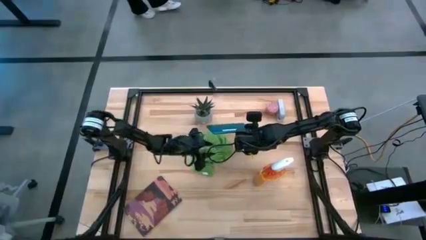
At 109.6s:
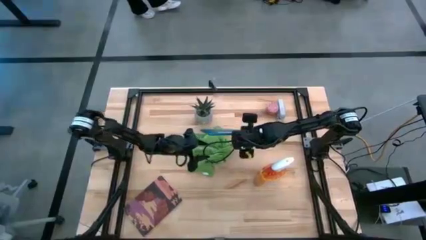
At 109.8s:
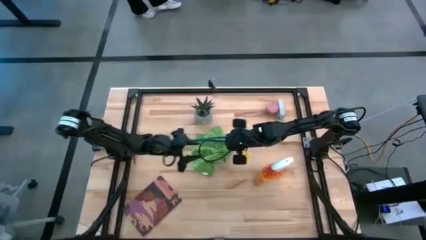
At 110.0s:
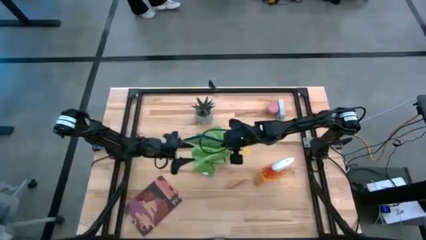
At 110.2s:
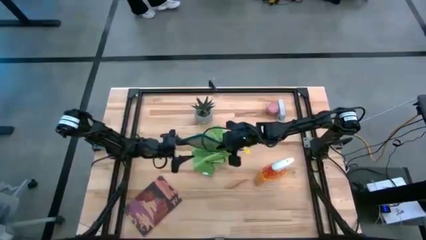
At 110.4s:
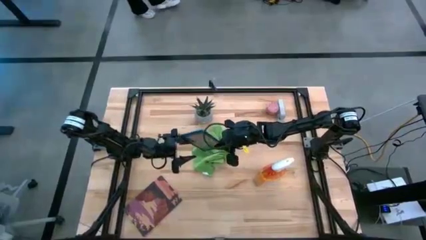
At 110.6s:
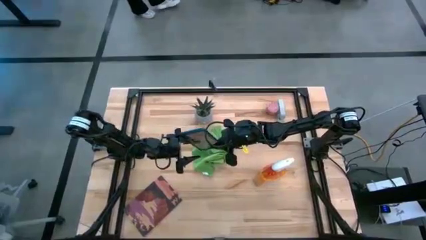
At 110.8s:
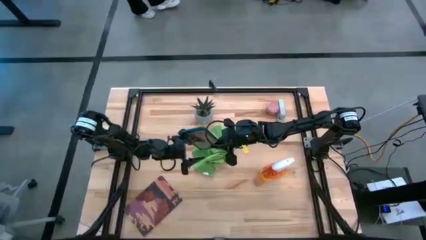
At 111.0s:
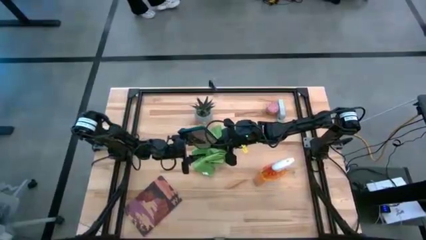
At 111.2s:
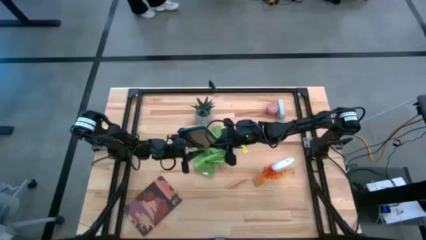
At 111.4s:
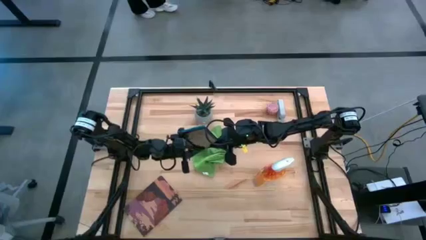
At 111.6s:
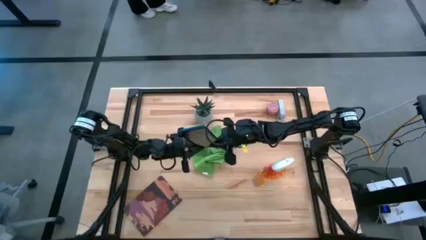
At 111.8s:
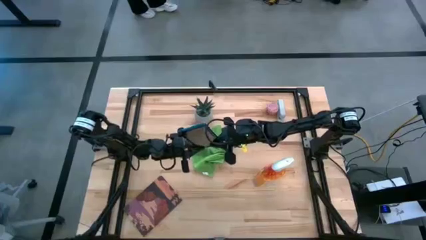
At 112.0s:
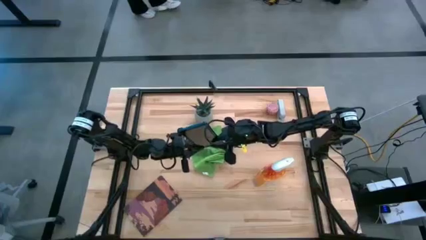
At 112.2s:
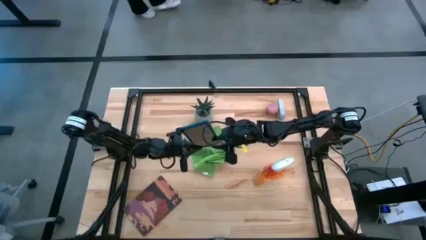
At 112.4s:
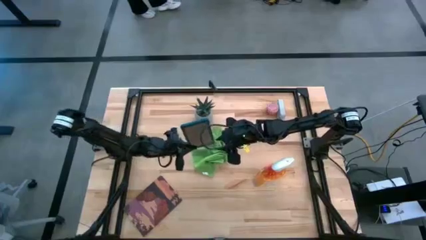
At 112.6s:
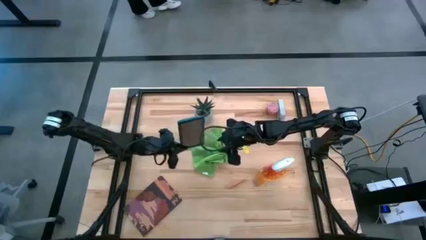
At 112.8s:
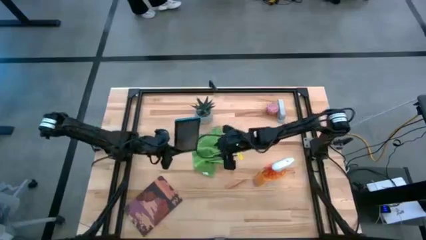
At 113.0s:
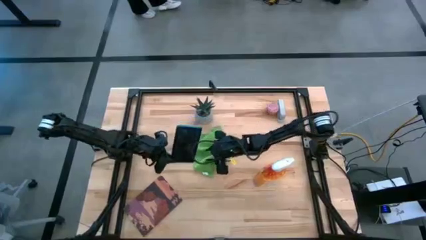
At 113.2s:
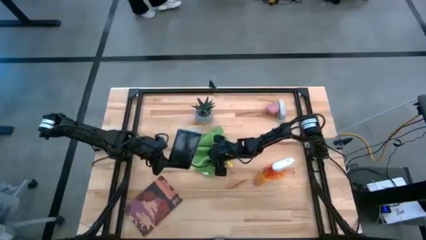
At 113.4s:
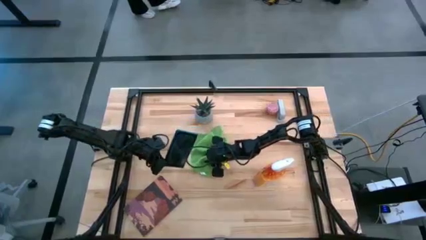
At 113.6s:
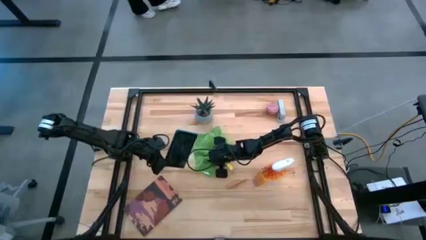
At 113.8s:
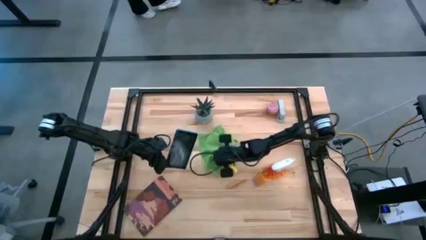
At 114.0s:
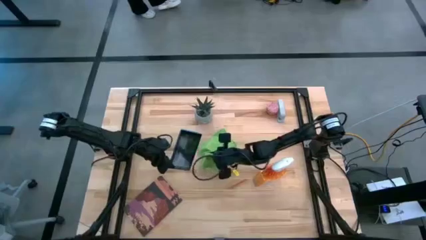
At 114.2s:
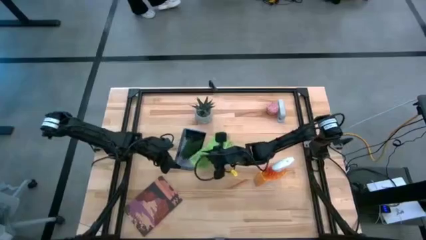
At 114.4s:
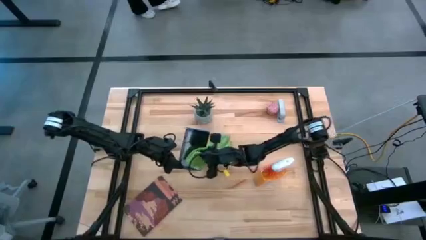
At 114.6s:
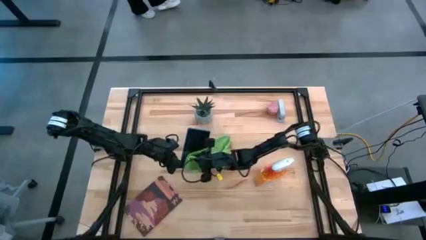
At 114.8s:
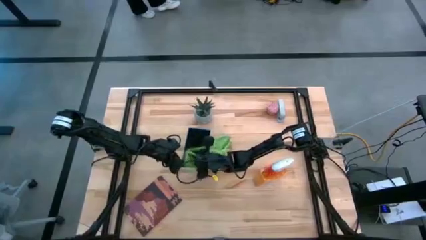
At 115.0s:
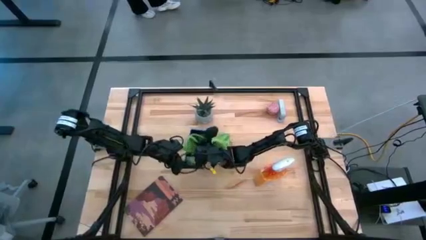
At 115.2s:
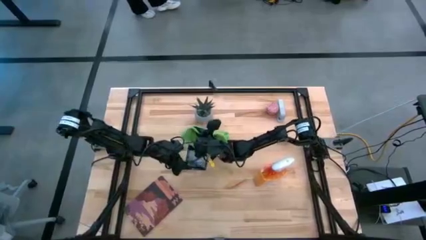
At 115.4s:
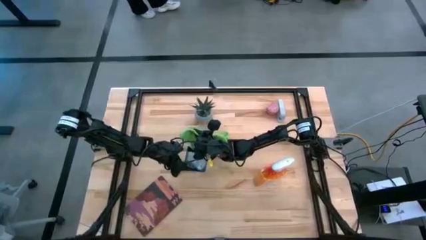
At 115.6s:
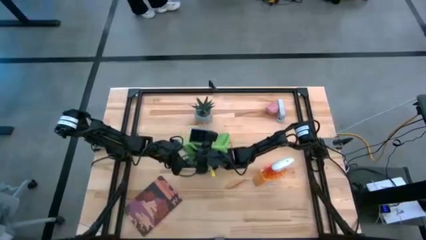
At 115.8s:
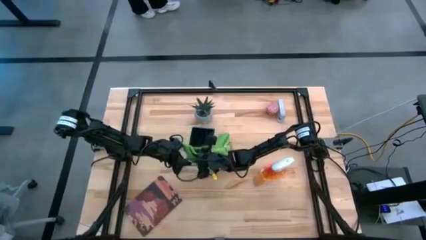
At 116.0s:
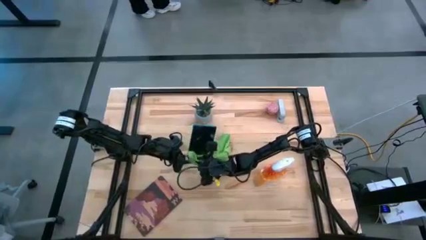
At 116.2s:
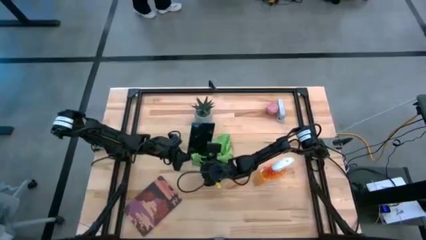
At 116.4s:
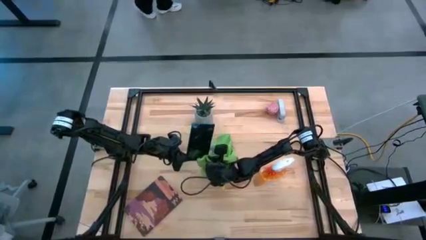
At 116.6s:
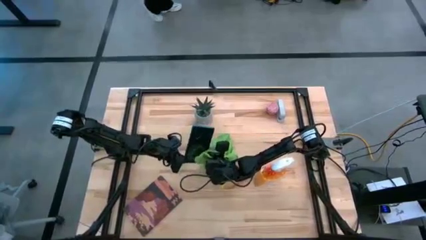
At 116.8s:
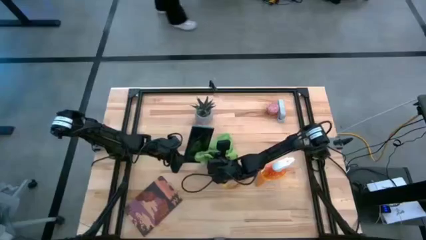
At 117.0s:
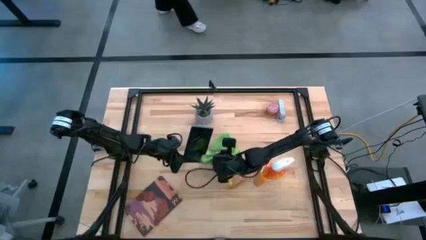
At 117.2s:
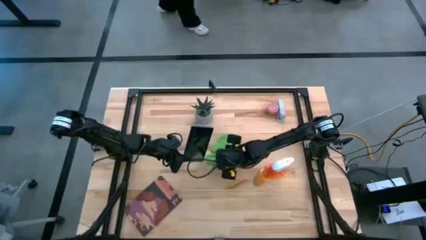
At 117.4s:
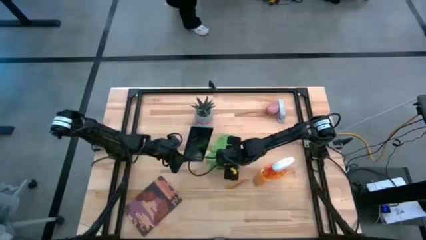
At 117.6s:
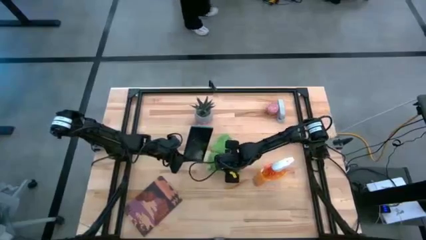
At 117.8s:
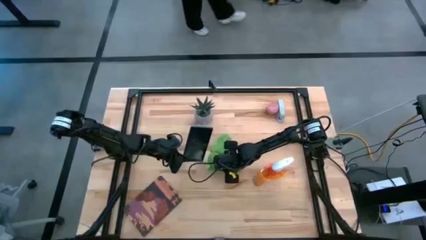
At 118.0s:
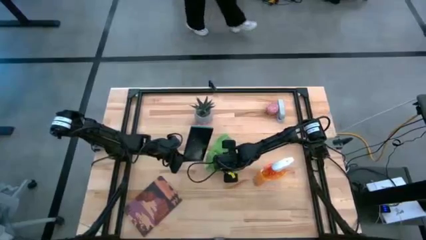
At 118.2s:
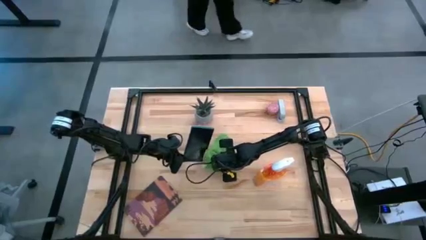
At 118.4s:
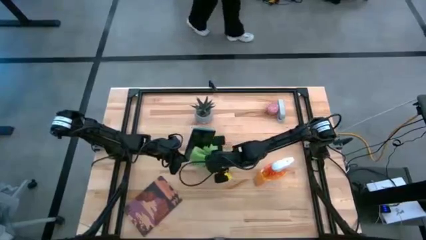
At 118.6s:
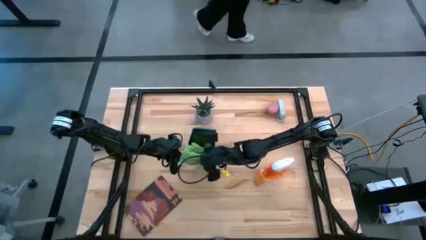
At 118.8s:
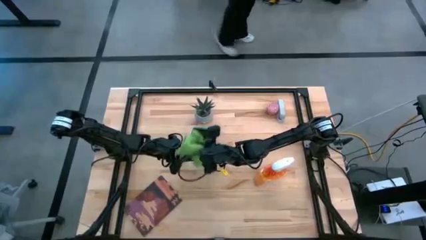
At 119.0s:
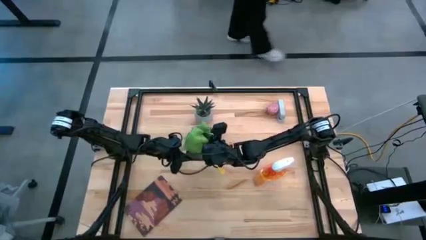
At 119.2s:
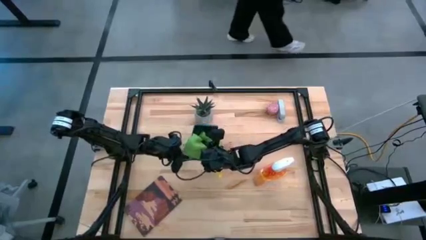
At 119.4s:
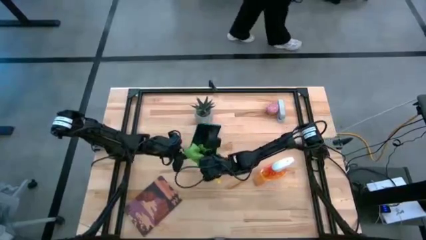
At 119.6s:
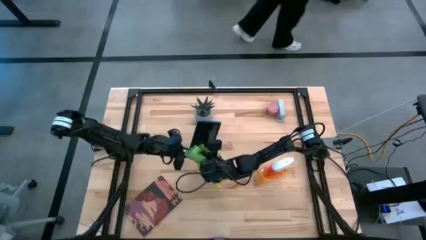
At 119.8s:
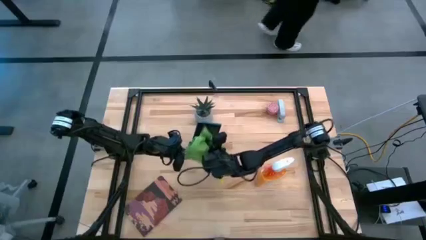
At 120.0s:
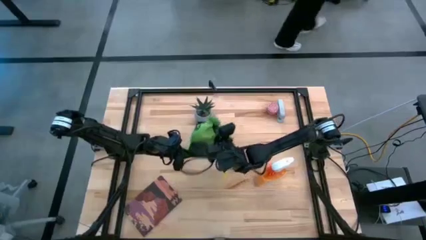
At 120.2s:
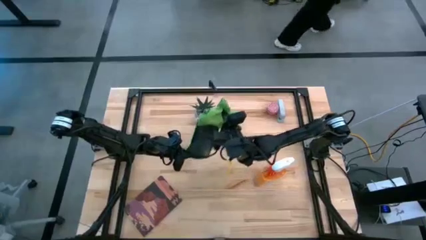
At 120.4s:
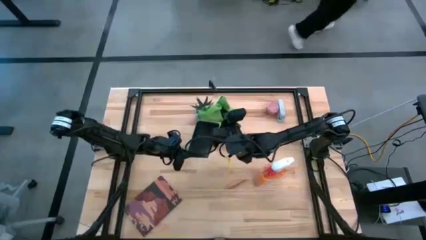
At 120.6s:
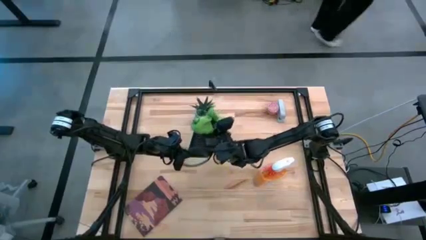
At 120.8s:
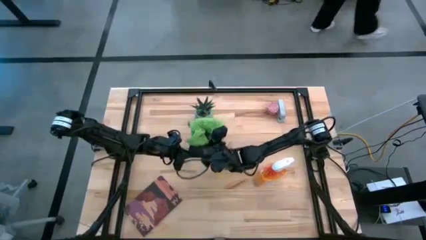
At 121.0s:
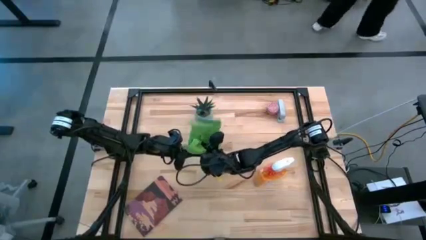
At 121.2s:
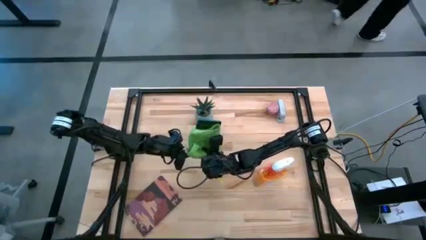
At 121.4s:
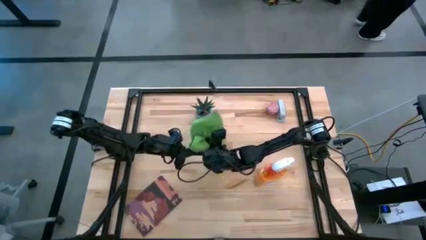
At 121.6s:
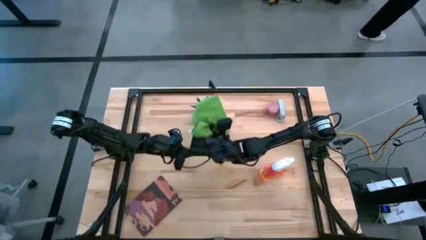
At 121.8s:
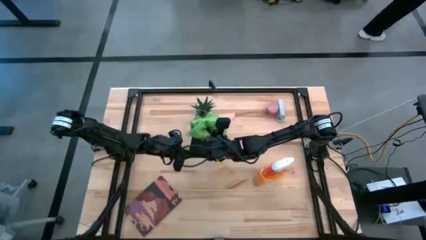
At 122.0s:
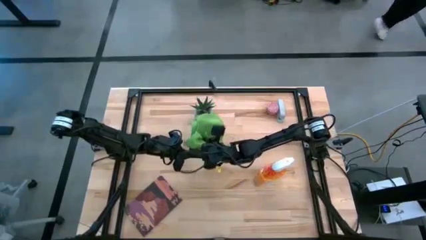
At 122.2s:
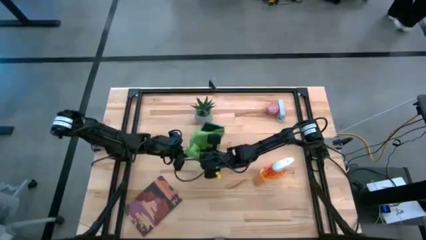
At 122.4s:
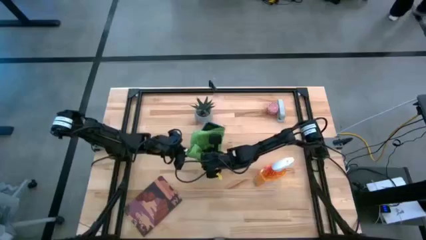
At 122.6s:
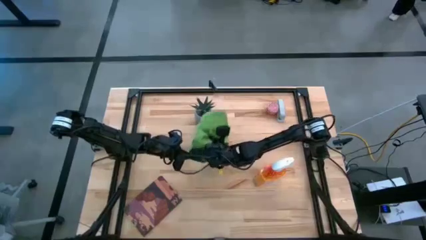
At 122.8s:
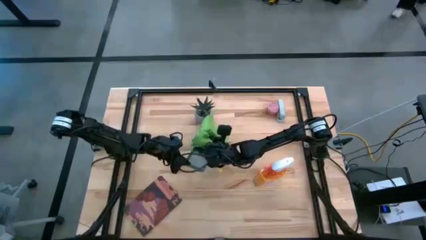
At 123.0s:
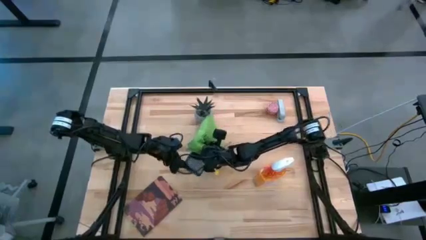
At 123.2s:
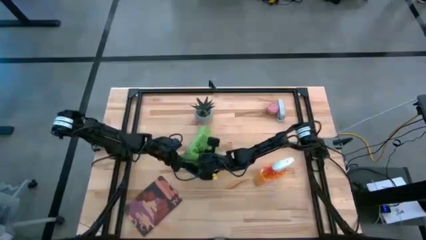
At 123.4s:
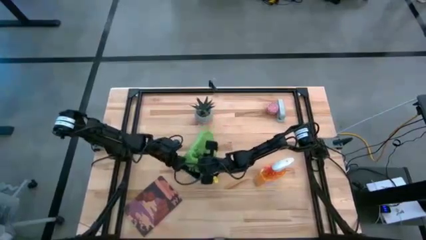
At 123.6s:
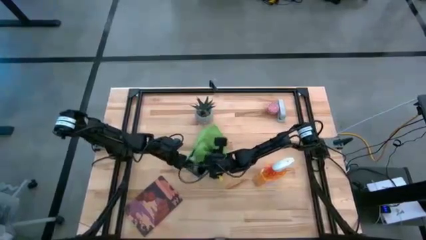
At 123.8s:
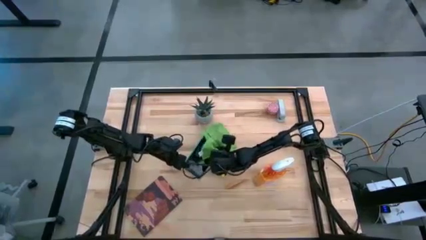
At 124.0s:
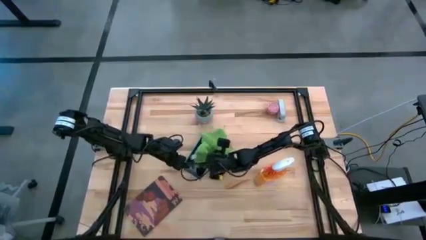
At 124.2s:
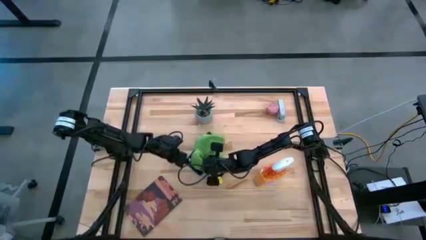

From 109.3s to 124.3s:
Task: Apply microfiber cloth
Wipe the front of the tablet with the microfiber cloth

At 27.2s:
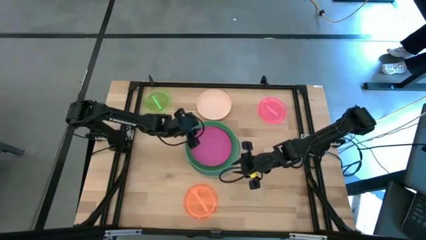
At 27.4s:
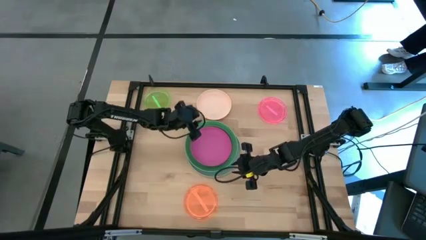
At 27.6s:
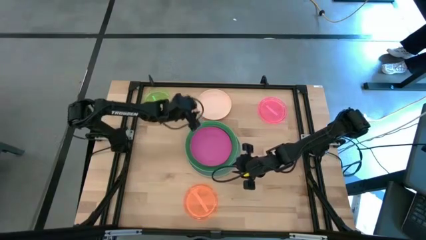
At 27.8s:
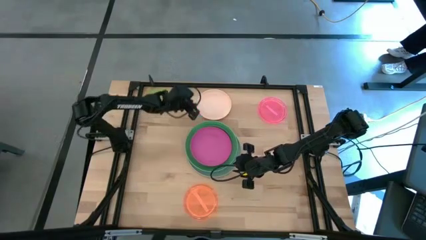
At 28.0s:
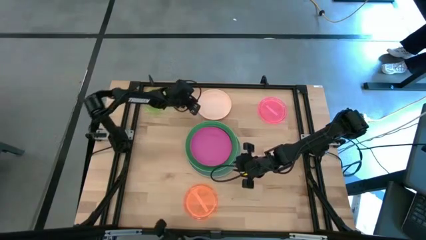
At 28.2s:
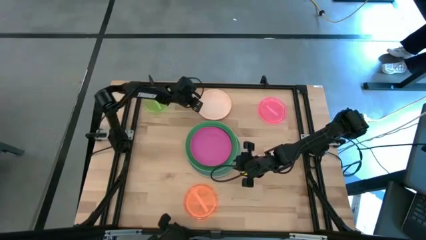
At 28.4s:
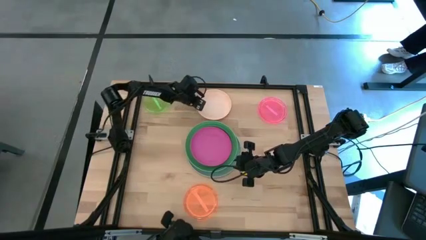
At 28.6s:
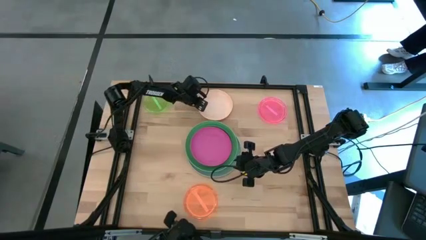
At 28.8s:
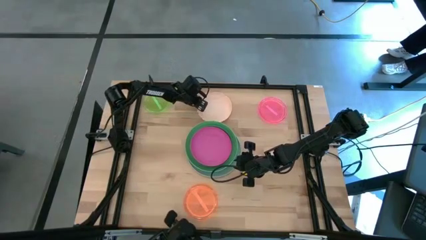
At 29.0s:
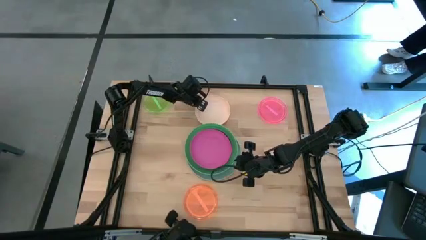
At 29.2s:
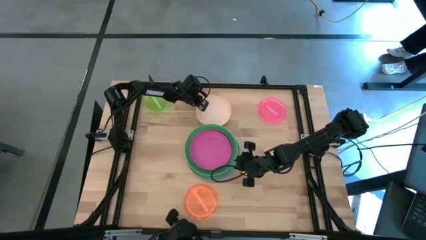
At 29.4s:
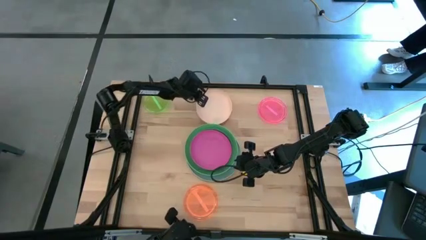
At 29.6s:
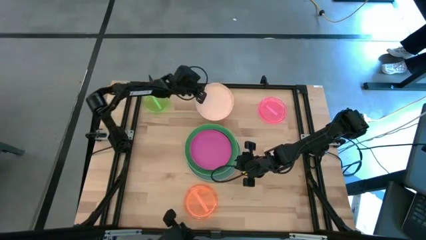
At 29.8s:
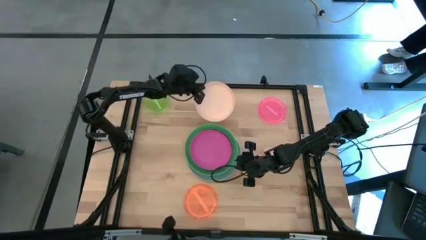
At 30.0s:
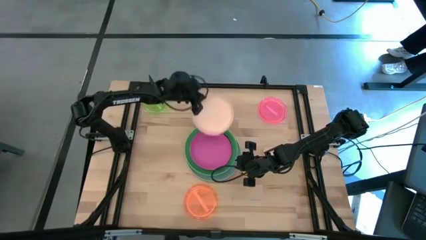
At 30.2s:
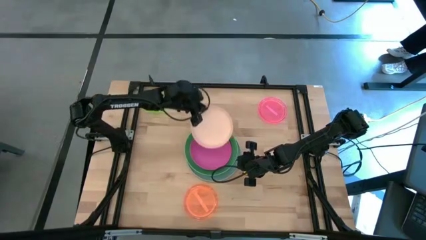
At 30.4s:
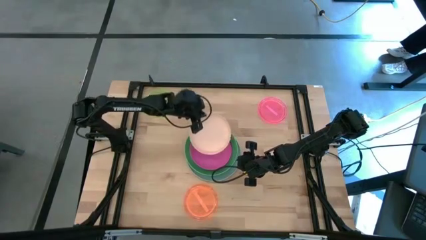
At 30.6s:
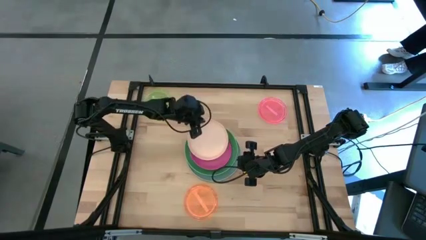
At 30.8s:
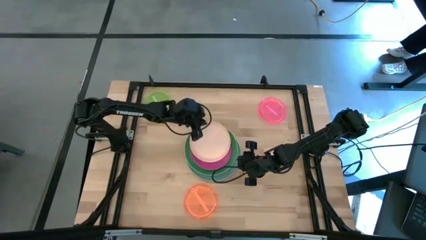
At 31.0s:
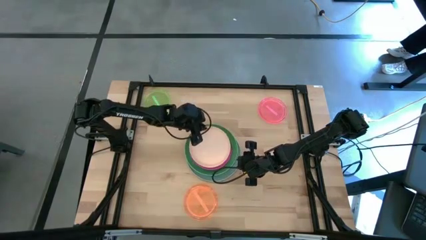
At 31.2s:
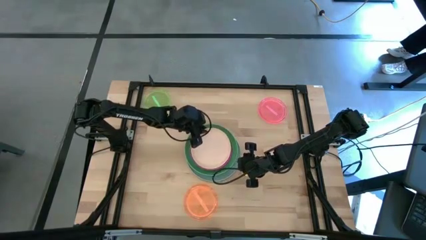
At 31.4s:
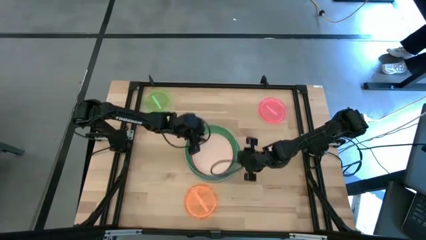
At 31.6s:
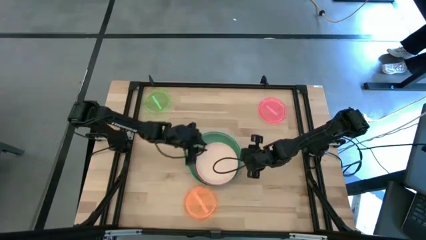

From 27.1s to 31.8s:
Task: Stack plastic plates
Stack the white plate on top of the pink plate
